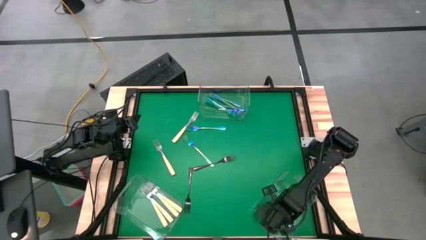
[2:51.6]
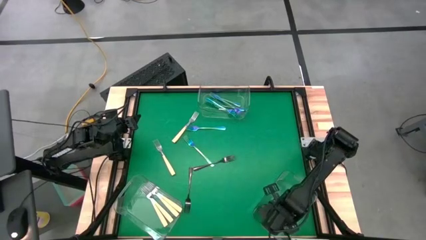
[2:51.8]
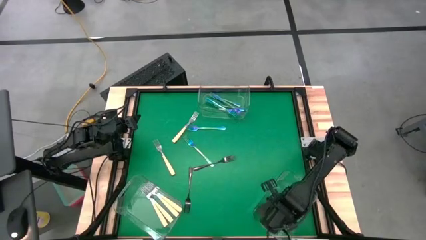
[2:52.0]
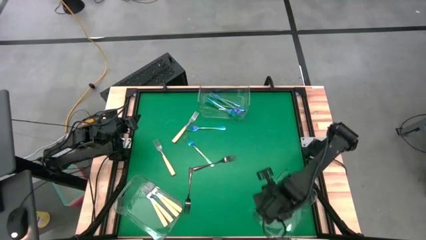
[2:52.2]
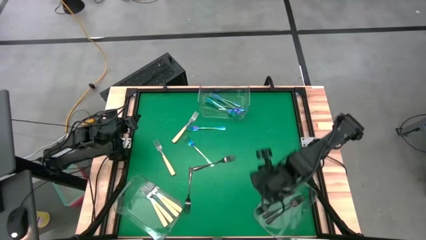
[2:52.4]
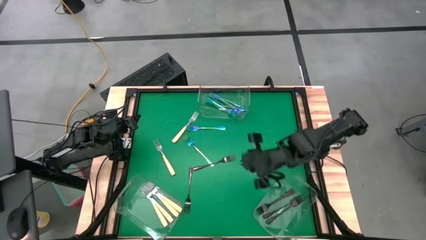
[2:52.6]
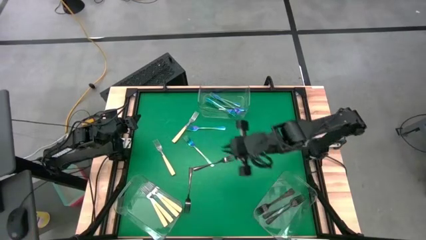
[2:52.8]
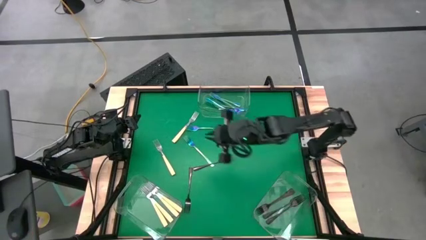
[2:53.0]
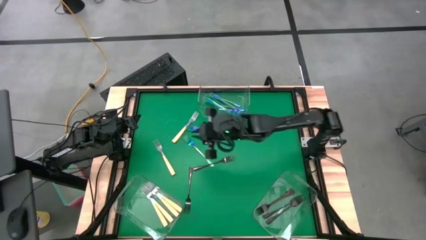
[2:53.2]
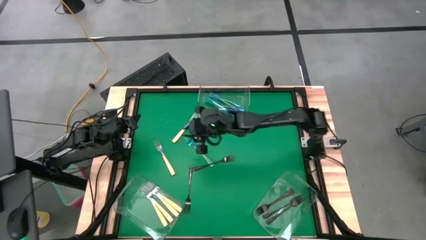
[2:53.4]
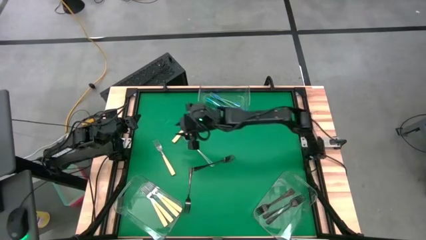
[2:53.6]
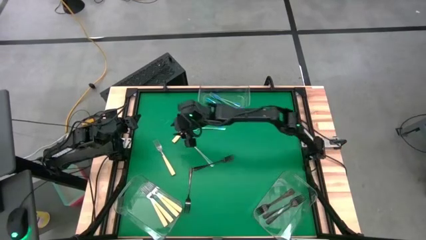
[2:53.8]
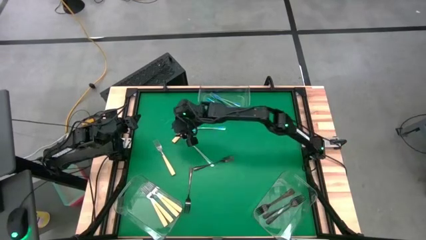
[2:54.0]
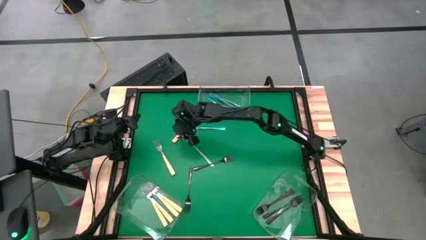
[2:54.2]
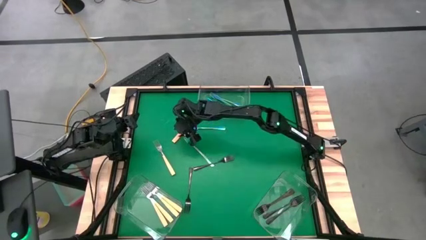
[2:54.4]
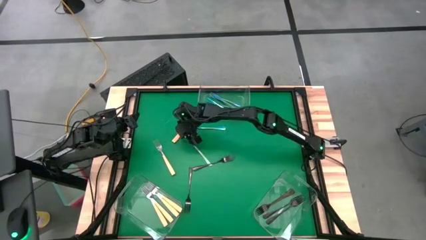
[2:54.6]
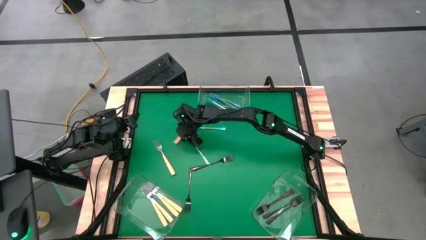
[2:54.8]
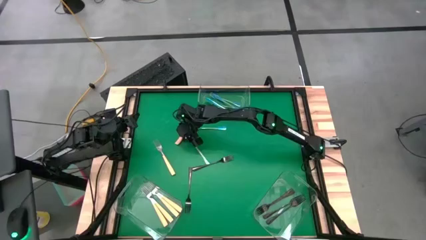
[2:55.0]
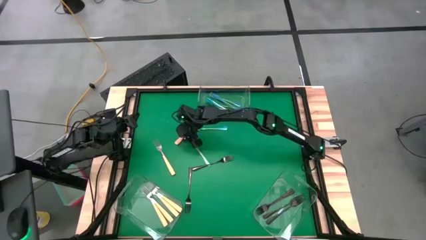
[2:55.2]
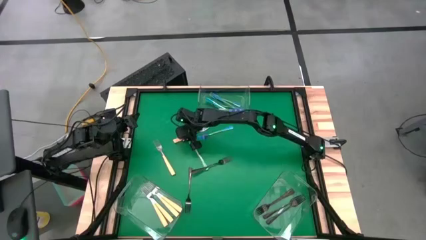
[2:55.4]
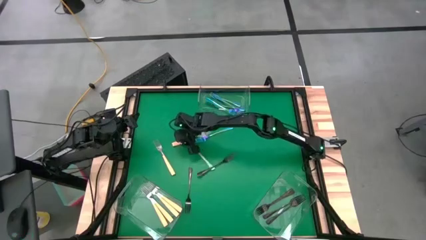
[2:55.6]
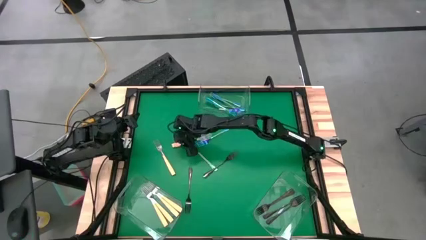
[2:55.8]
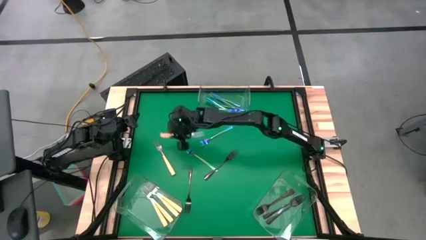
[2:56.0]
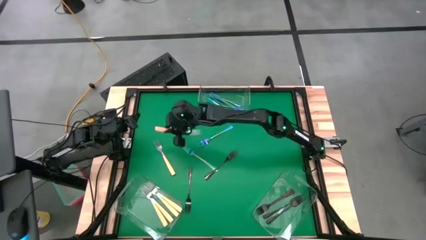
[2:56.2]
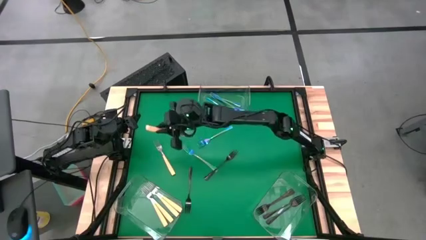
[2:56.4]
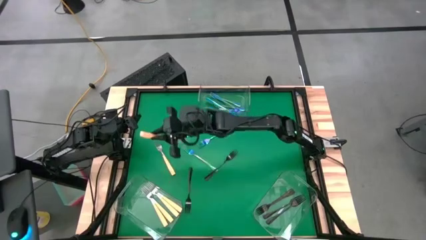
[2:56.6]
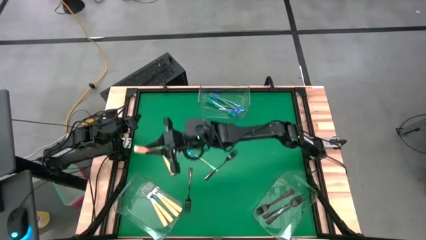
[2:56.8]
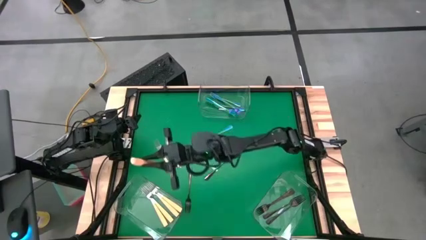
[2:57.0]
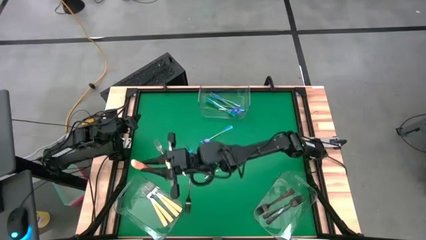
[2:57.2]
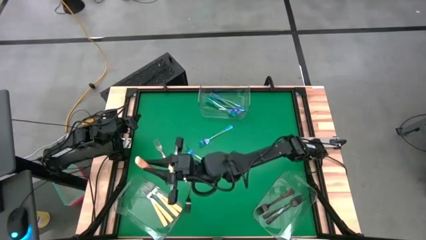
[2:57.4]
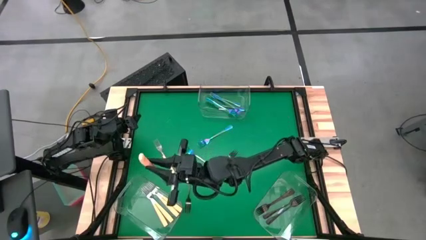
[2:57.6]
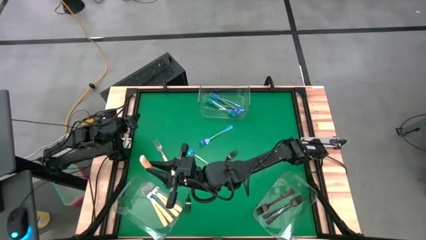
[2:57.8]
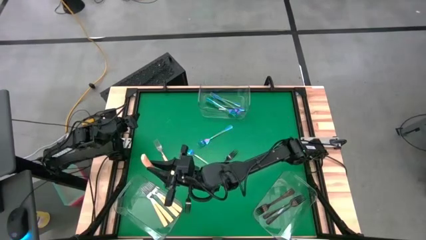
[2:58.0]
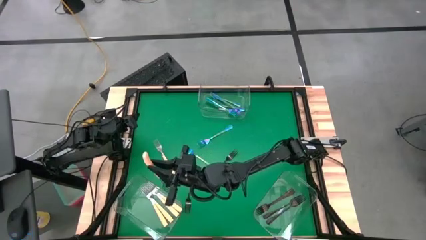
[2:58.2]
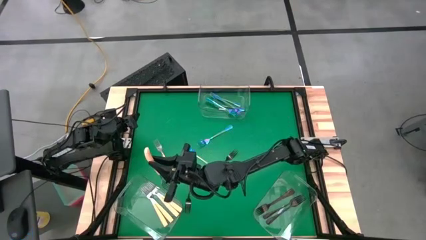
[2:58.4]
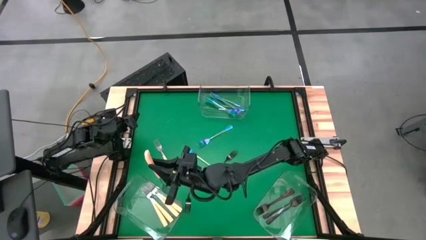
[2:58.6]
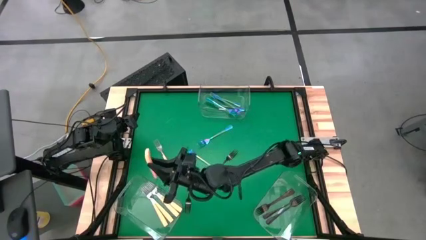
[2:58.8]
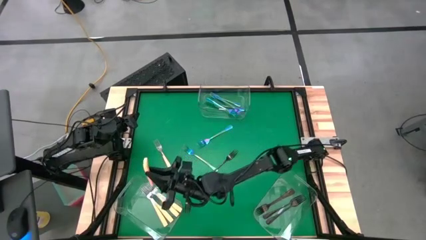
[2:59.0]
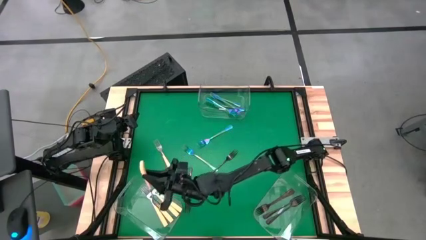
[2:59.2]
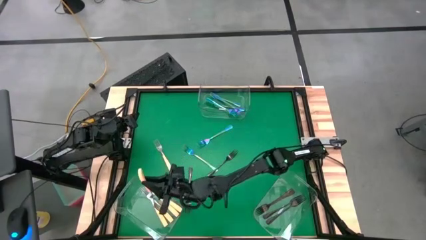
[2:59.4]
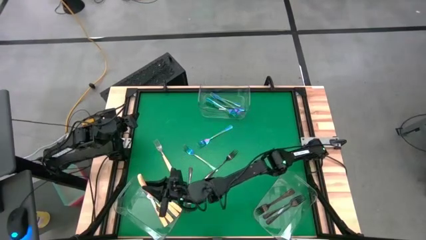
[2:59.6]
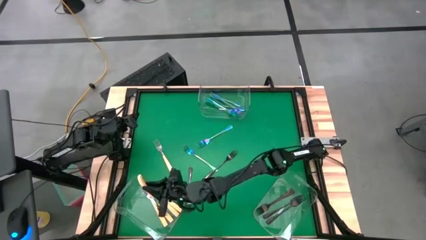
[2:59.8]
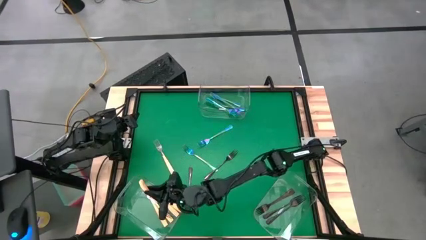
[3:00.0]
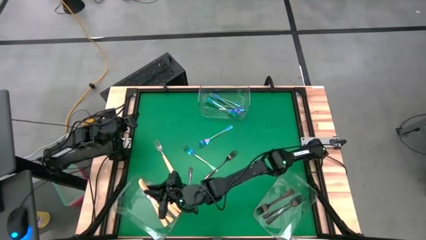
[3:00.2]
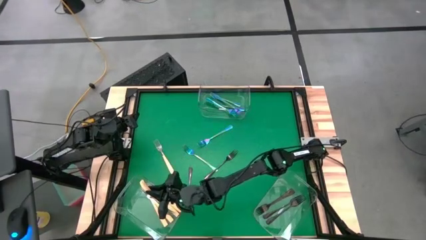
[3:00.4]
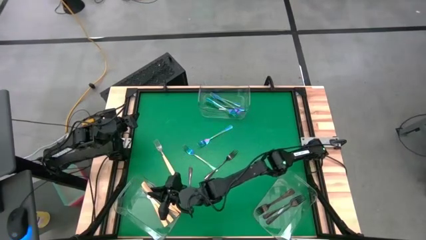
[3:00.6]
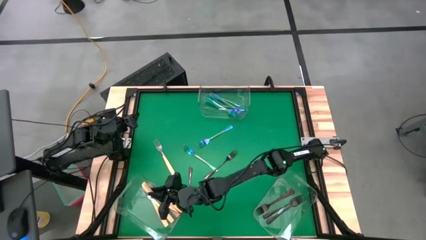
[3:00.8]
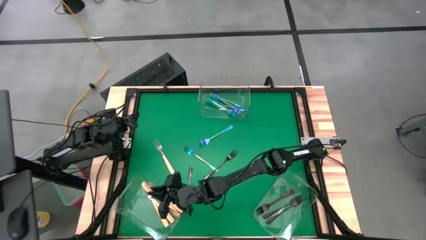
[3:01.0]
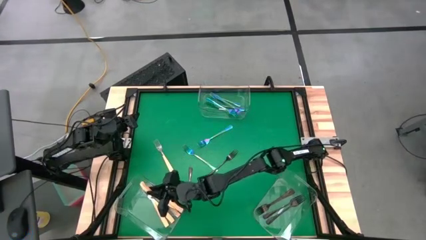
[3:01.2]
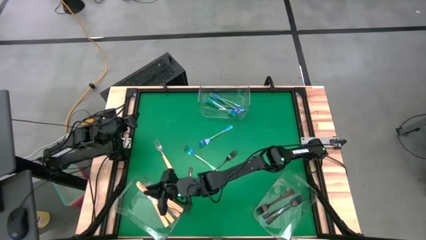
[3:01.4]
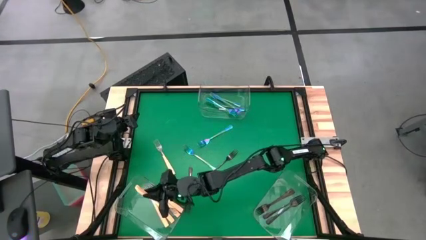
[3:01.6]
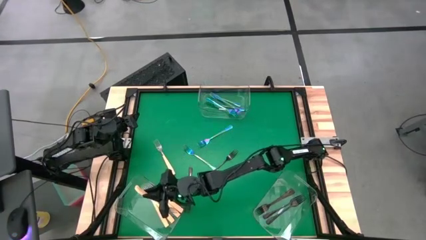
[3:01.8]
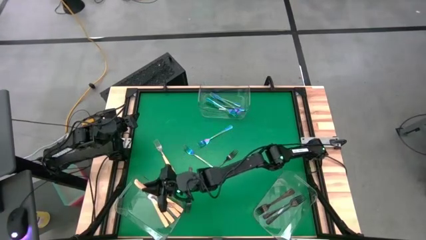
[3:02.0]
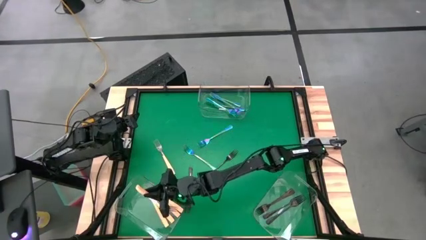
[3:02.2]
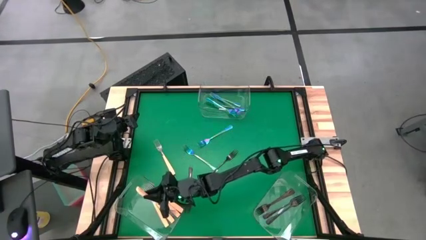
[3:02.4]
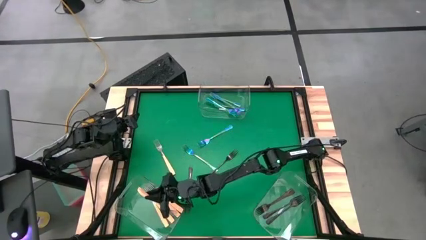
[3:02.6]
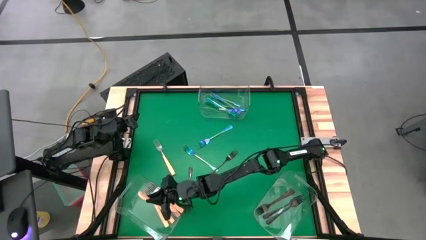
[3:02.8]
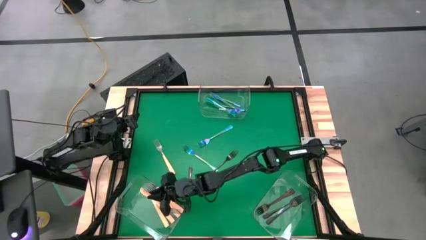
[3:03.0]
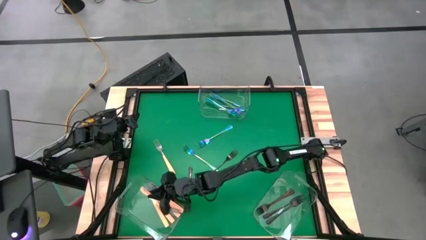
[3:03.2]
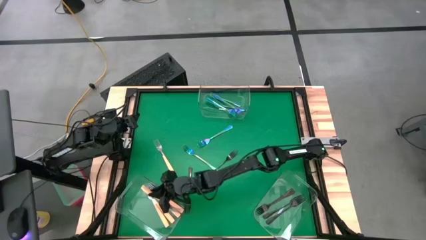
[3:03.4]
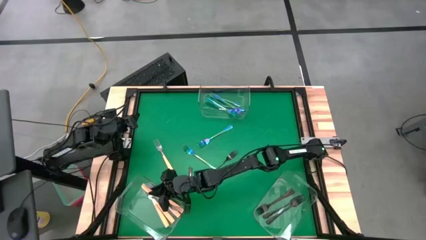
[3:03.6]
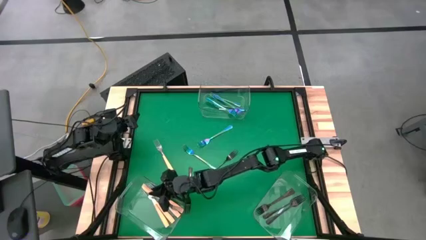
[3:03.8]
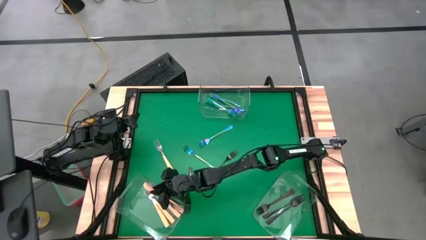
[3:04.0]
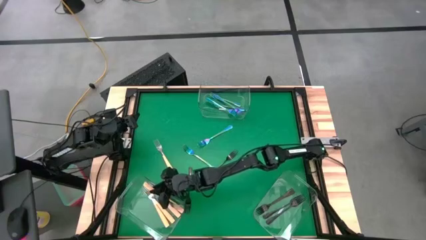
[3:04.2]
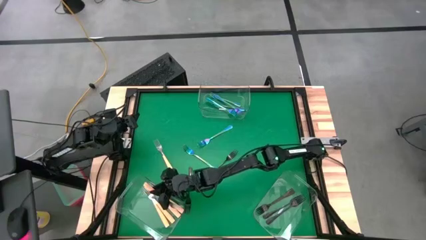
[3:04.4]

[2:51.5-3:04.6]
Task: Sort silverware by color (type)
Put the orange fork into the bottom left transparent bin

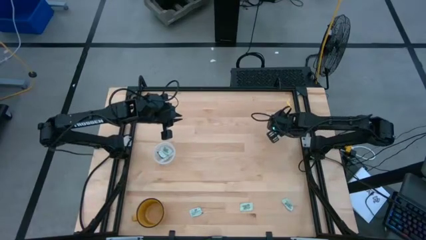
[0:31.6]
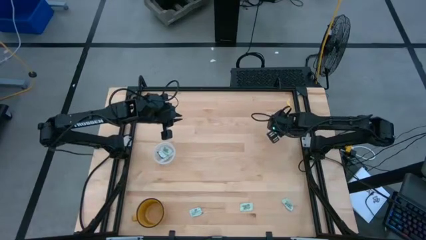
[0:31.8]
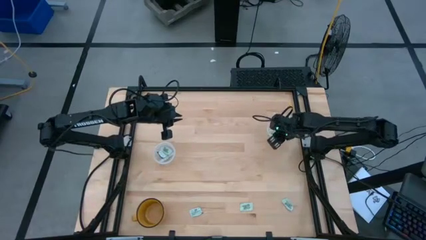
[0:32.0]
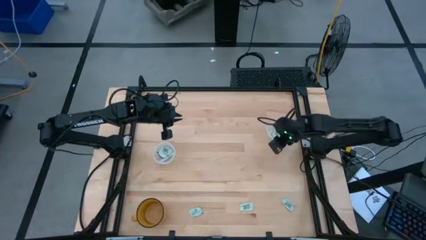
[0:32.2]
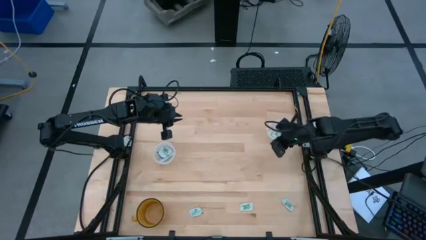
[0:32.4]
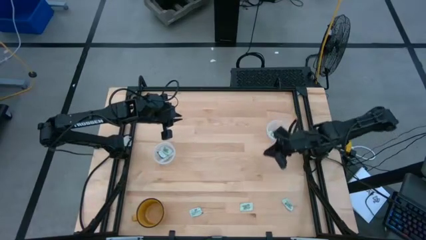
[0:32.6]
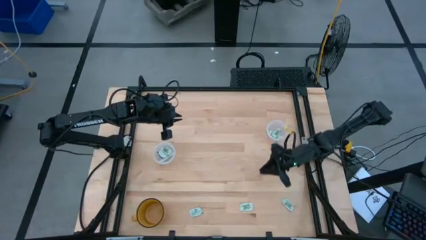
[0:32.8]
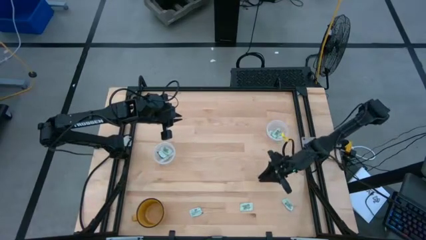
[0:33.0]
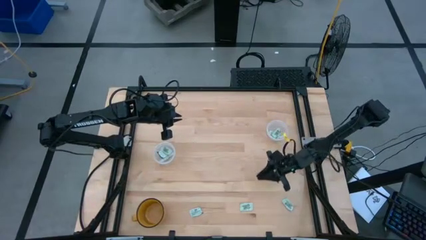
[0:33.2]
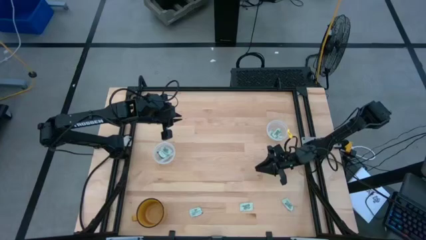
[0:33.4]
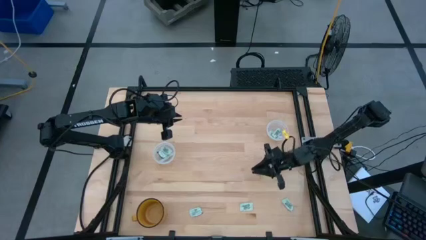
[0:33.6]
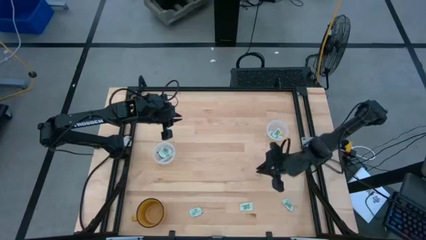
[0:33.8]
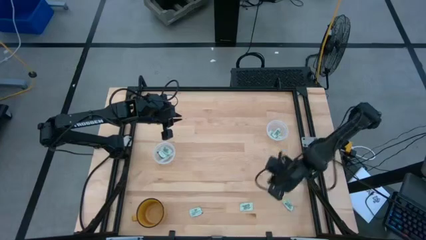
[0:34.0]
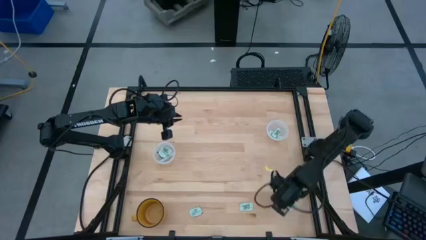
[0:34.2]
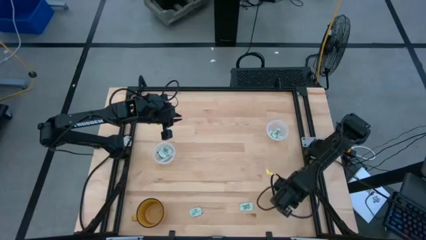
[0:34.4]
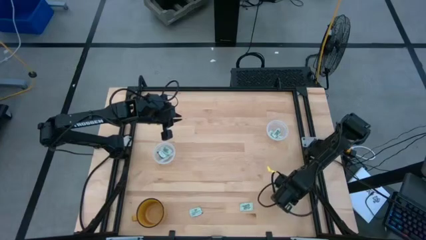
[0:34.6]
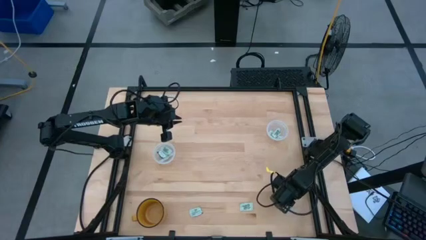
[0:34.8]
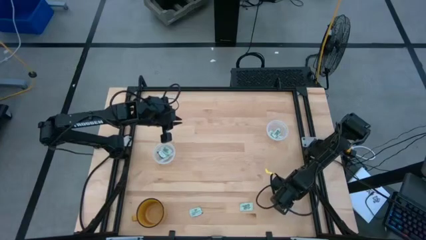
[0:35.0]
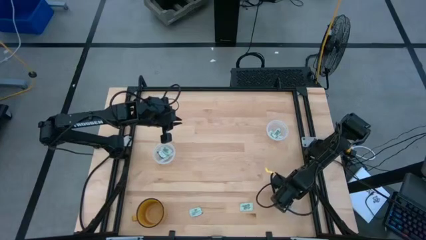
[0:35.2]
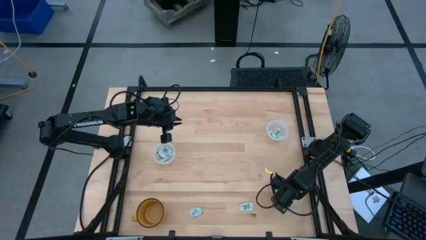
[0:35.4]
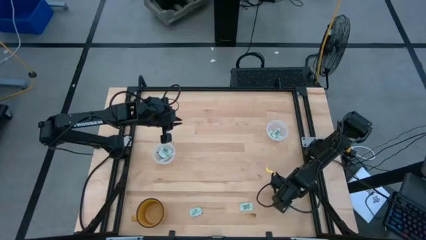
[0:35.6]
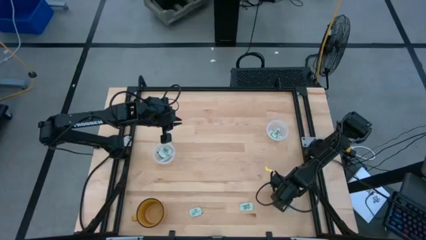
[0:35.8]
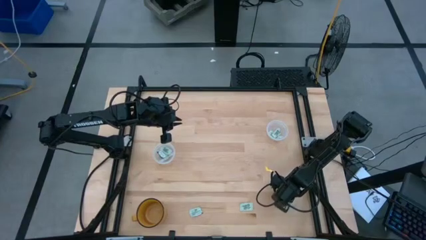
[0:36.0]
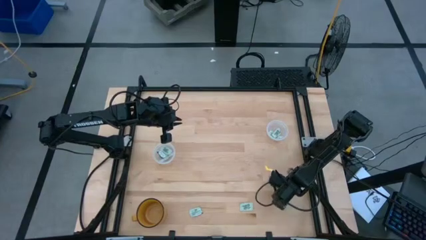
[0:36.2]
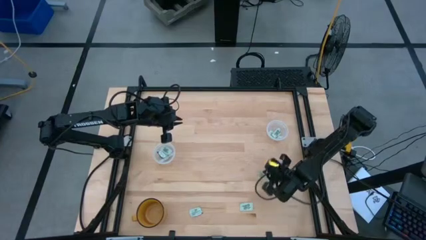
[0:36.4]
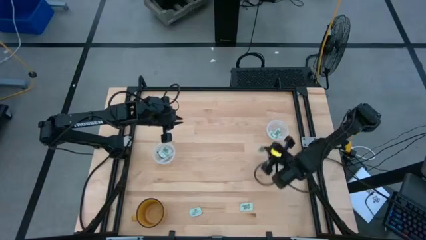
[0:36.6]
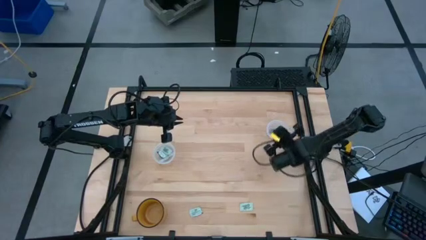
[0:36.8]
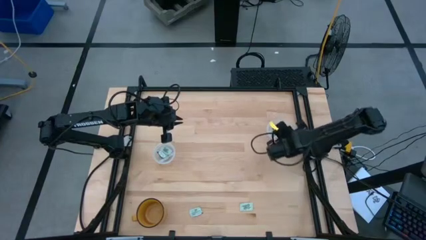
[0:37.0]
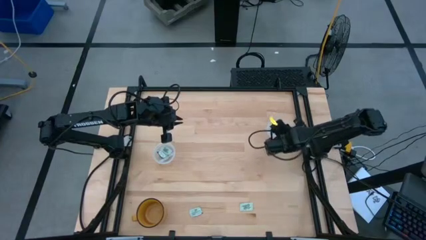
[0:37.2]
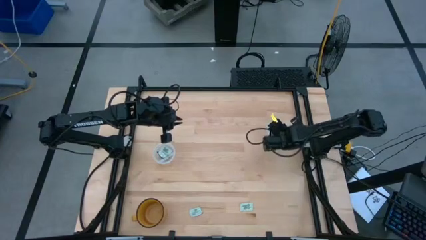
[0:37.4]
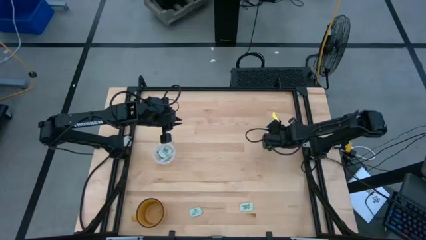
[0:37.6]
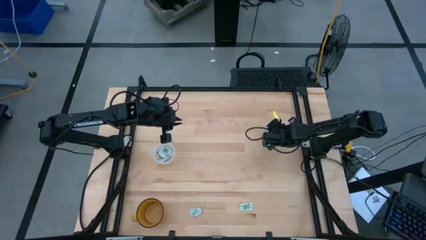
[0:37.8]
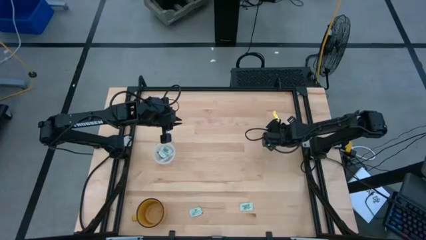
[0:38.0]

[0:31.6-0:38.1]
Task: Pick and place items into bin
Put the green stevia packet into the right transparent bin
